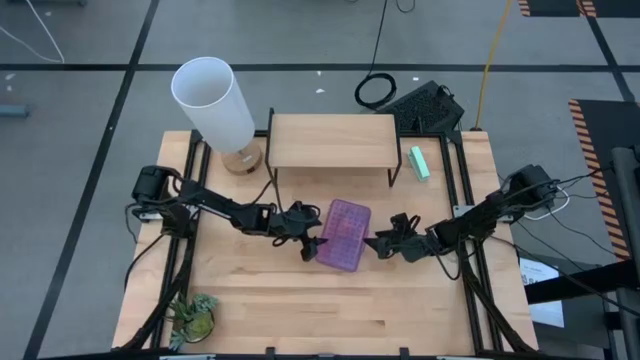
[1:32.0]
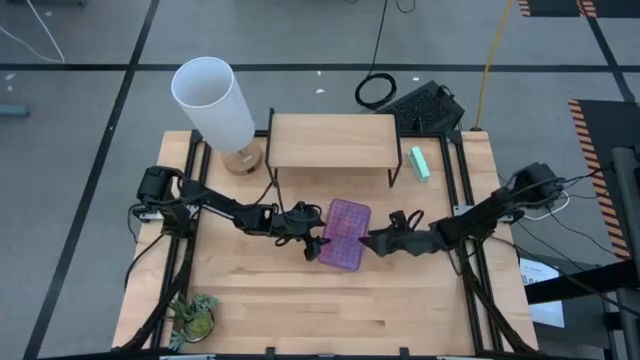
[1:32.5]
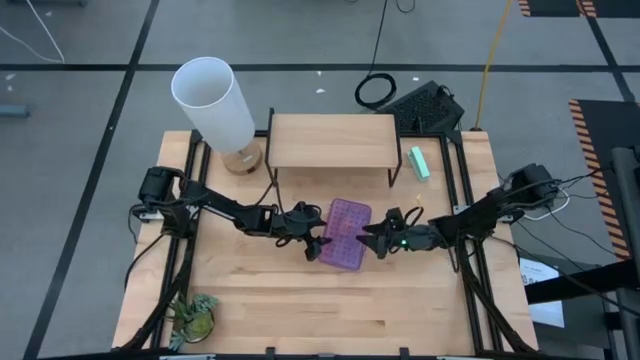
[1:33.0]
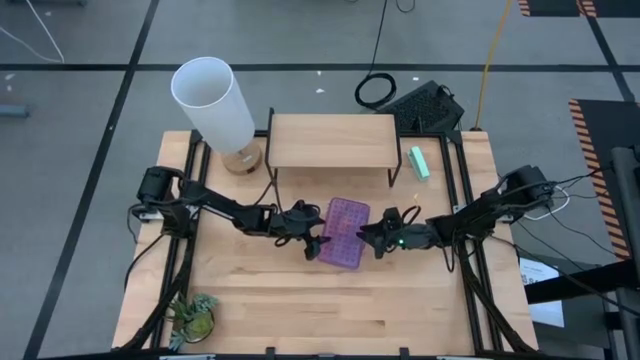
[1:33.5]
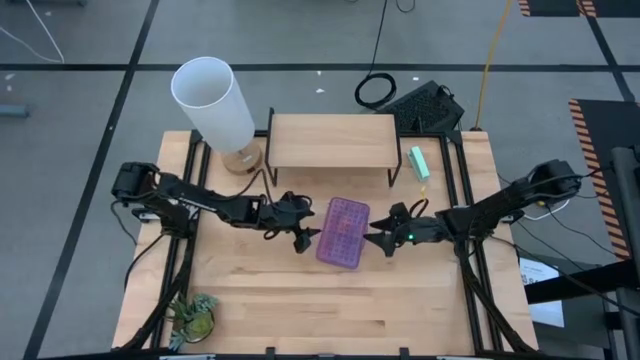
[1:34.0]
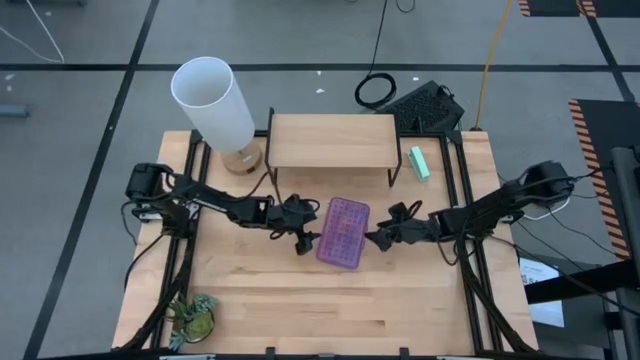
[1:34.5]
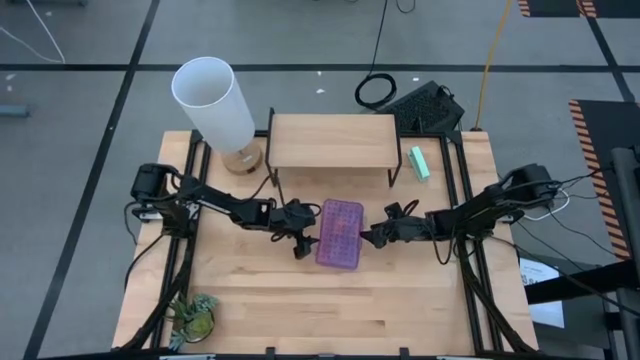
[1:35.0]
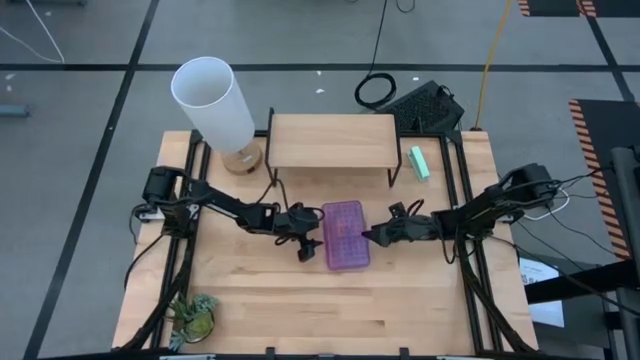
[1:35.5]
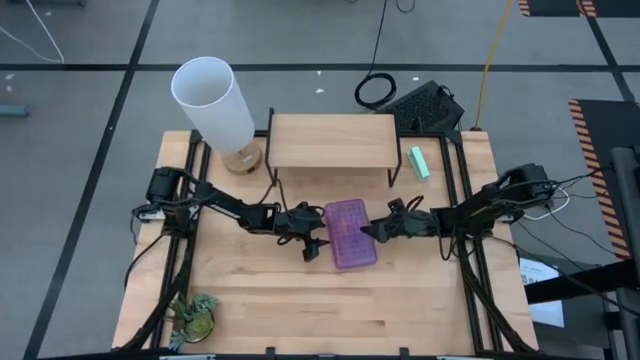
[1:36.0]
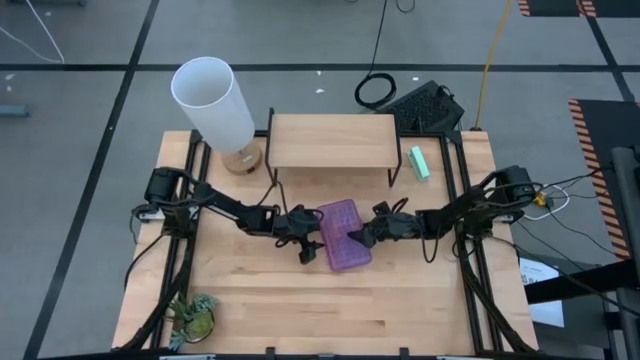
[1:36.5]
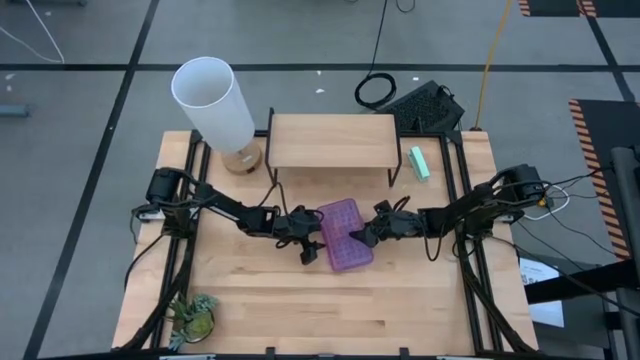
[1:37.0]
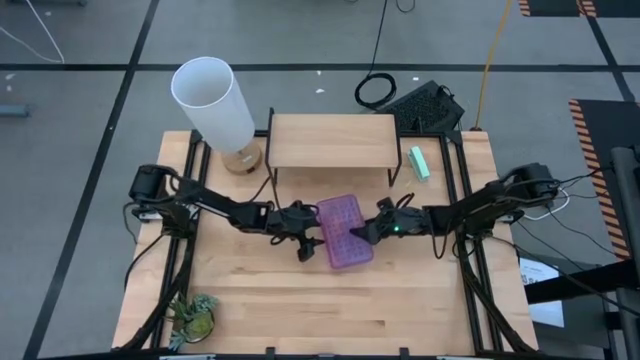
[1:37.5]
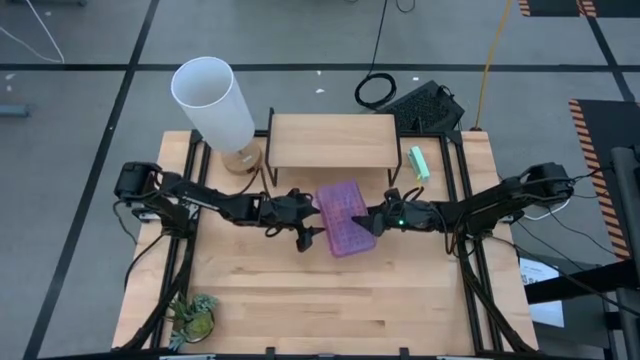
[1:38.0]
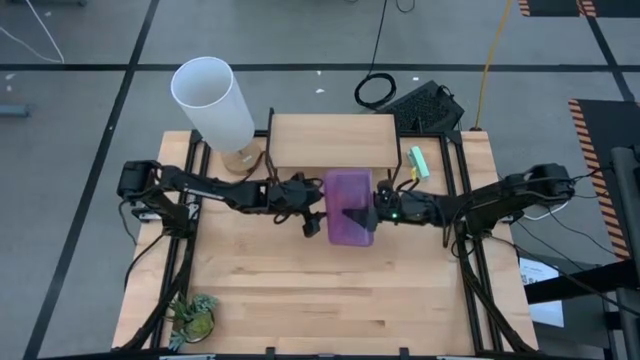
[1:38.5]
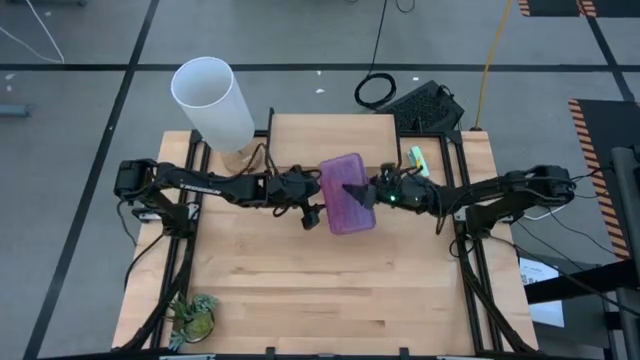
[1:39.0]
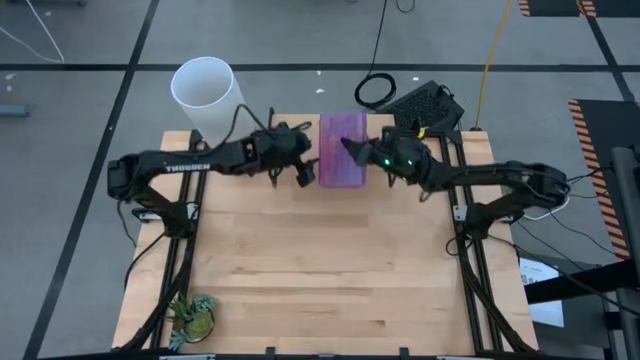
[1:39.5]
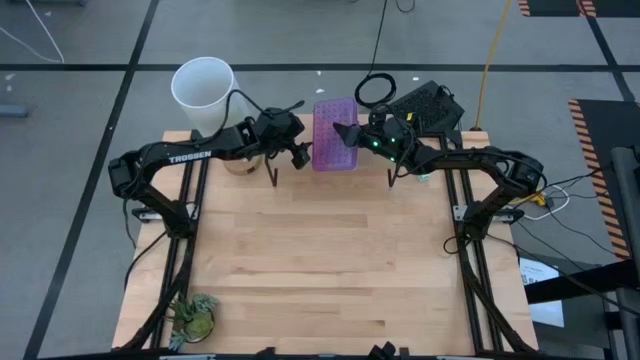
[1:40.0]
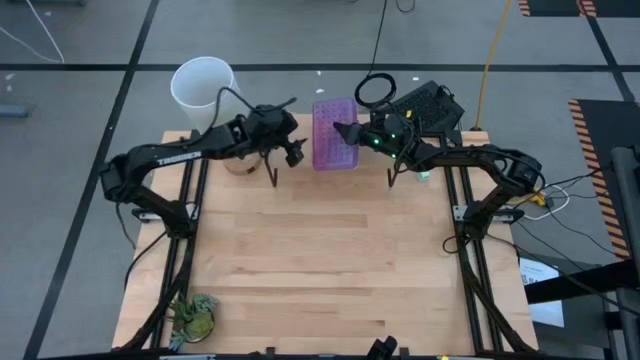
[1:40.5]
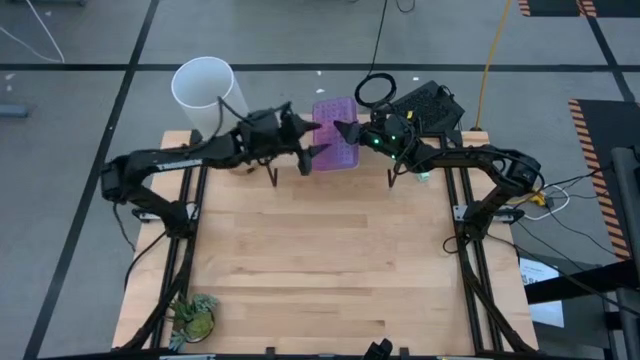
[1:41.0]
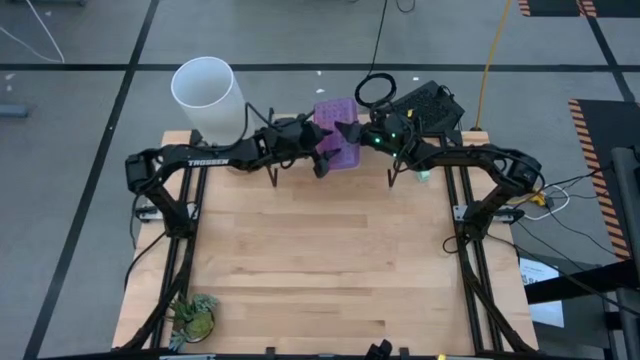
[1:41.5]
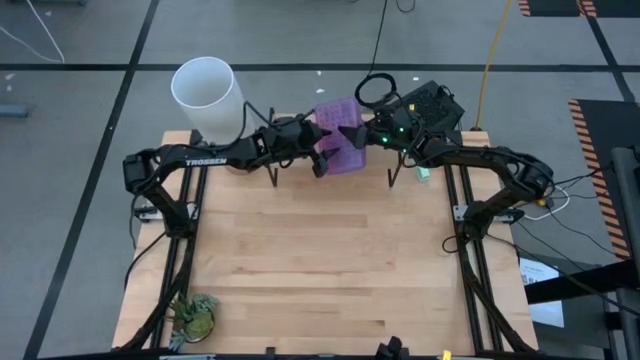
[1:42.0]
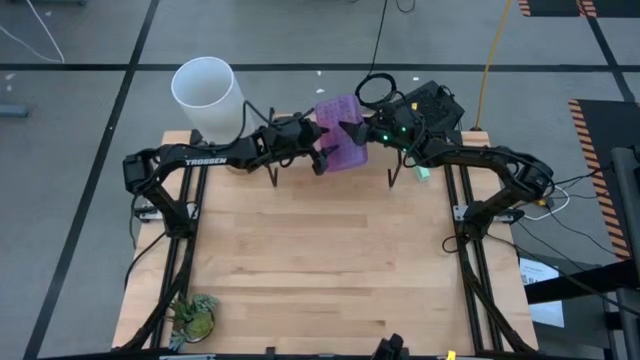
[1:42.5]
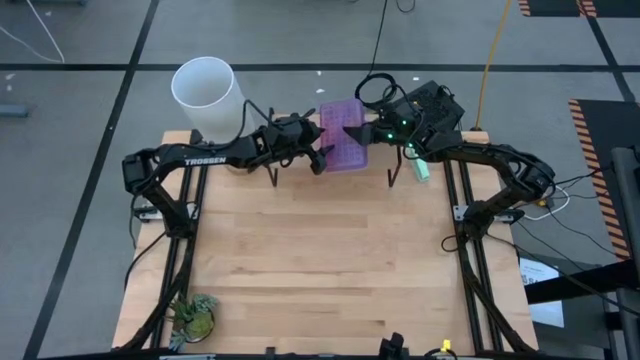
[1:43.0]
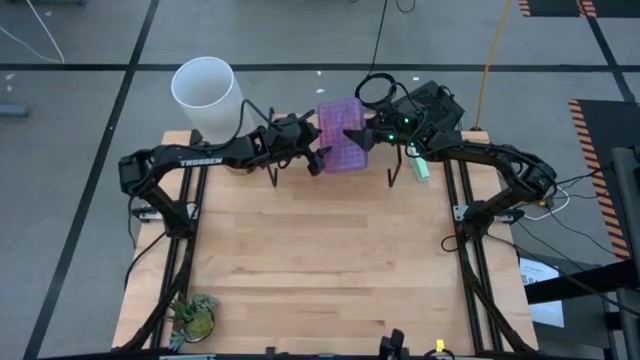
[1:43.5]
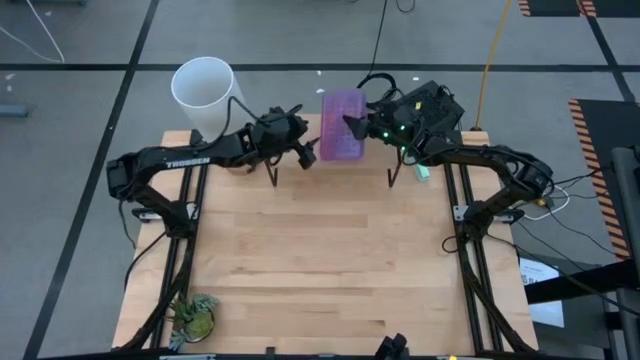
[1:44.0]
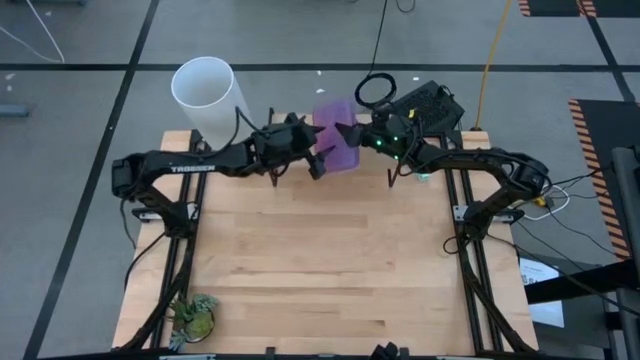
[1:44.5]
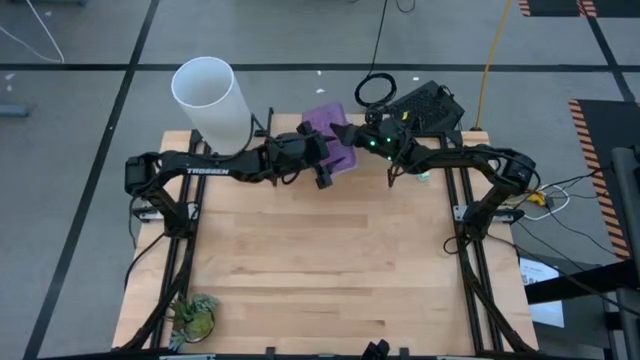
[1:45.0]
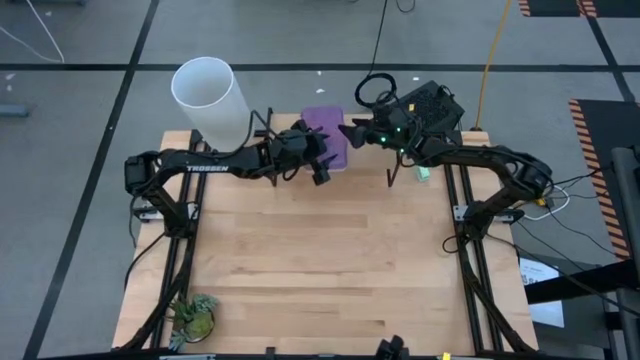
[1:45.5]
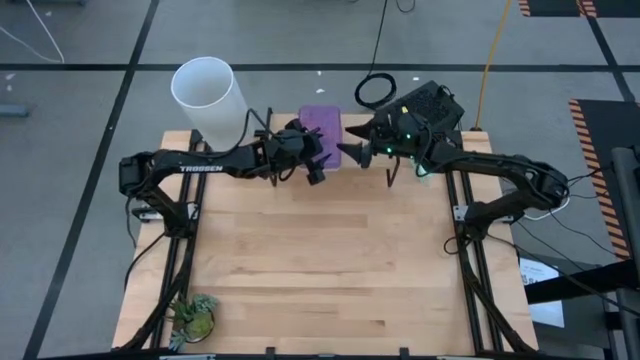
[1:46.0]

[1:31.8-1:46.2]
Task: Pack school essentials
Put the violet supply box on the shelf

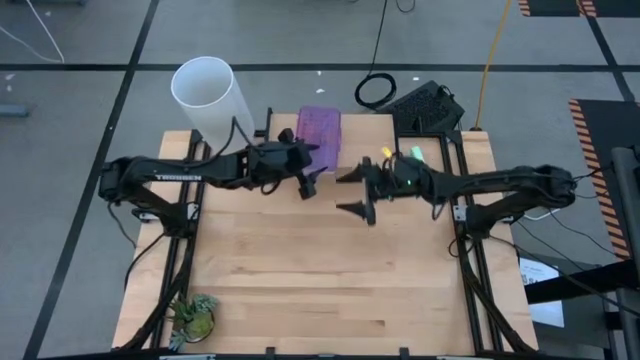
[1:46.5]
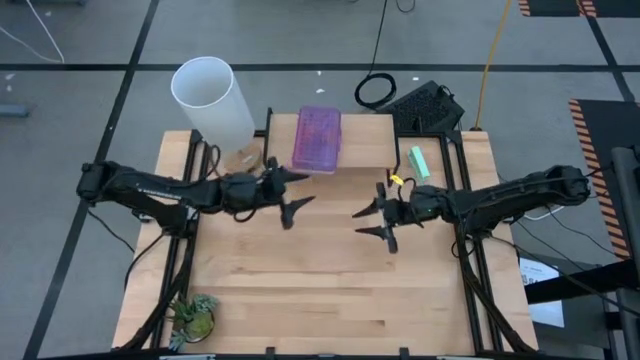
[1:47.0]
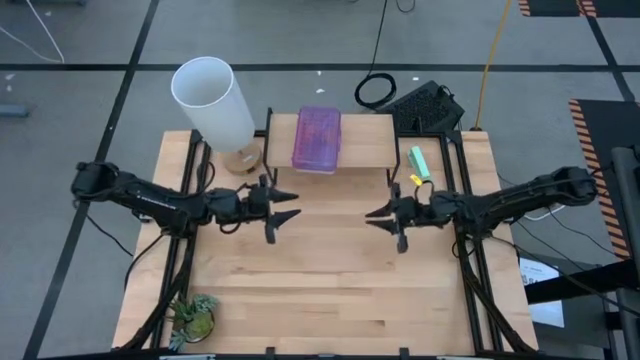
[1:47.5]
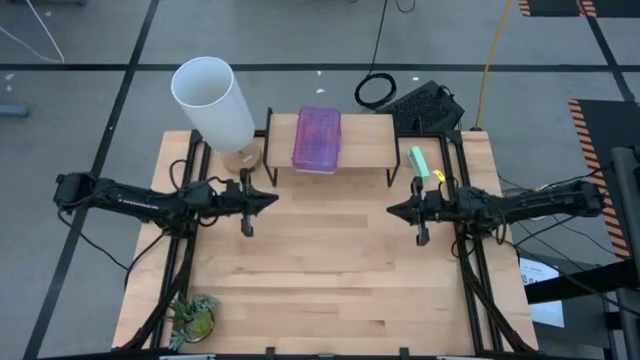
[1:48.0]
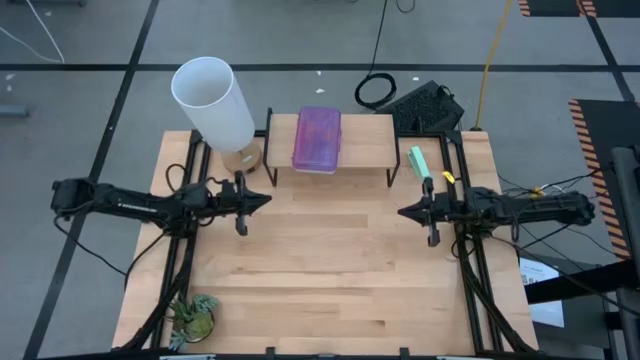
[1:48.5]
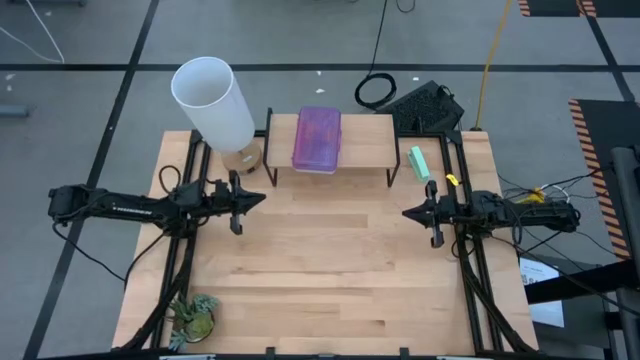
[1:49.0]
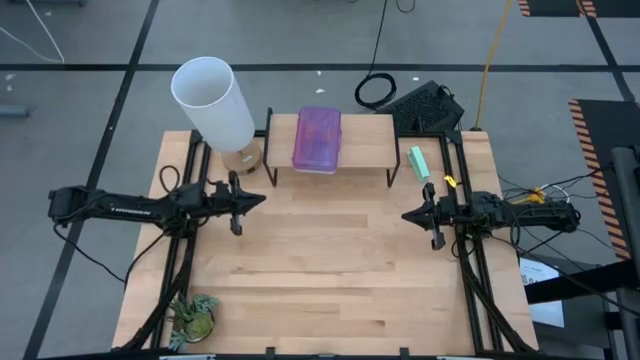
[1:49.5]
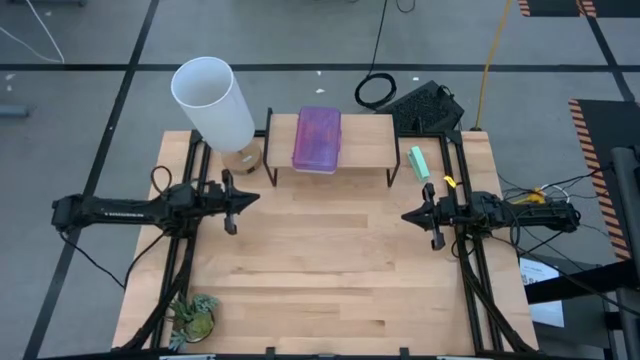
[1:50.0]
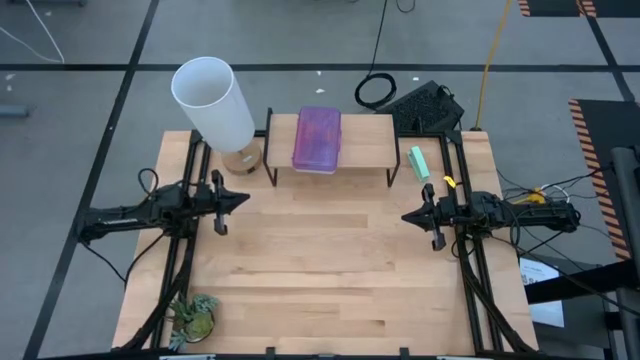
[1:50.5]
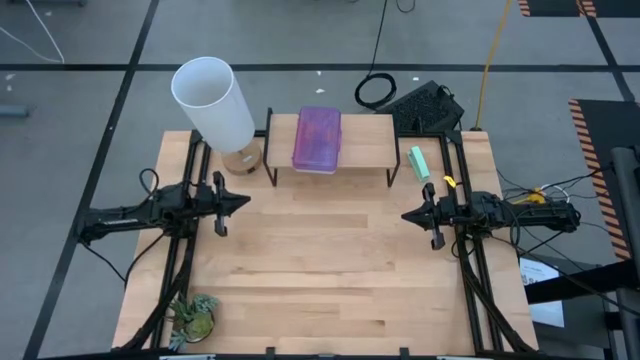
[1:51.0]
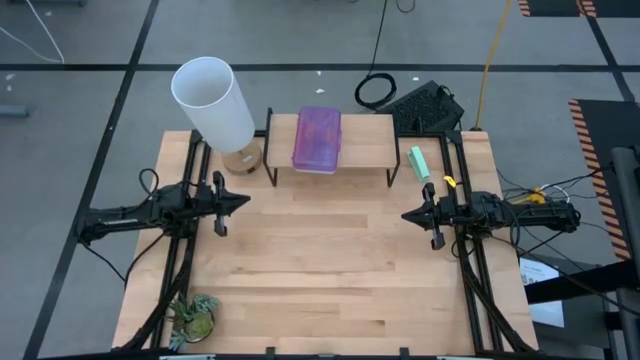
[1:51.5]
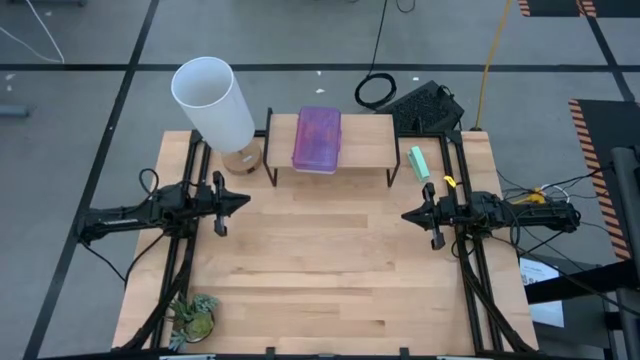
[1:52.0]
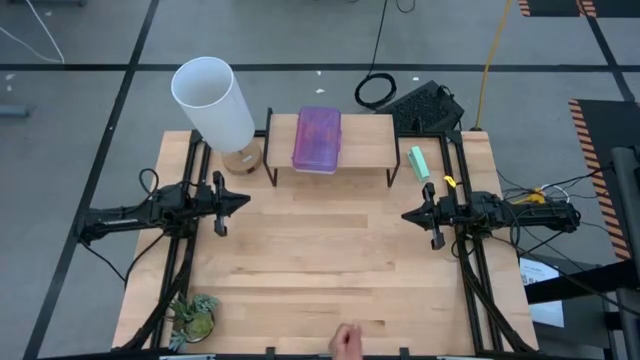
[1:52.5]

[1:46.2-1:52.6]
Return to Home Position
